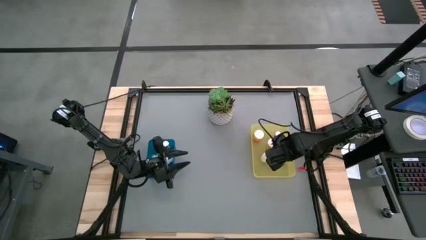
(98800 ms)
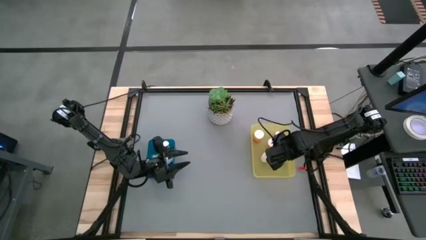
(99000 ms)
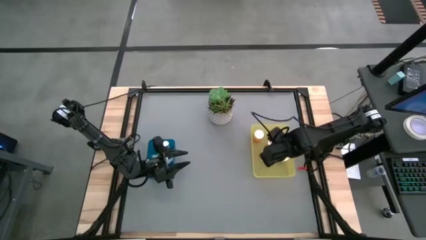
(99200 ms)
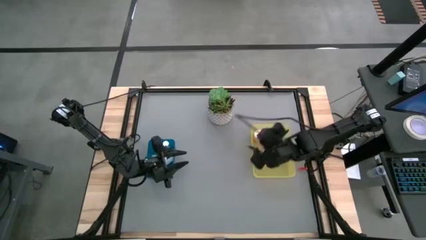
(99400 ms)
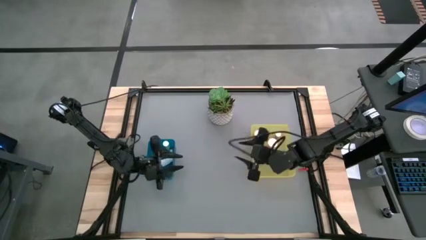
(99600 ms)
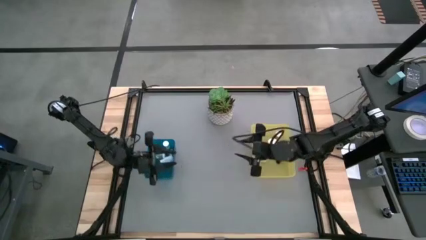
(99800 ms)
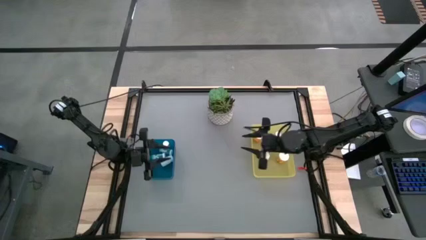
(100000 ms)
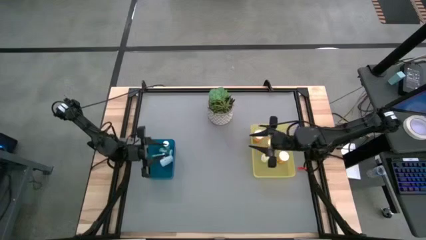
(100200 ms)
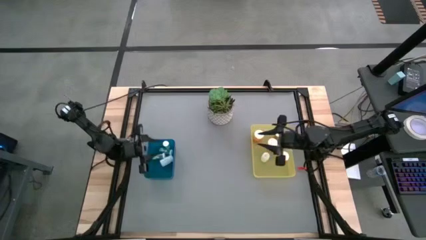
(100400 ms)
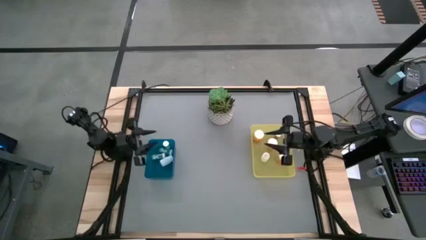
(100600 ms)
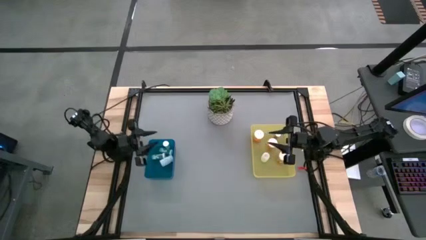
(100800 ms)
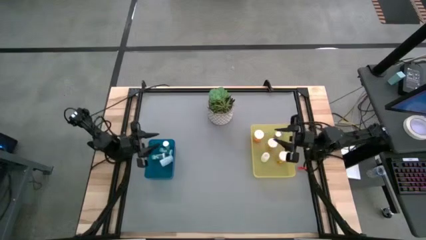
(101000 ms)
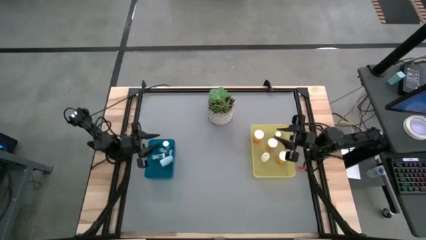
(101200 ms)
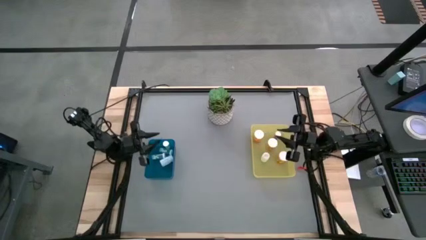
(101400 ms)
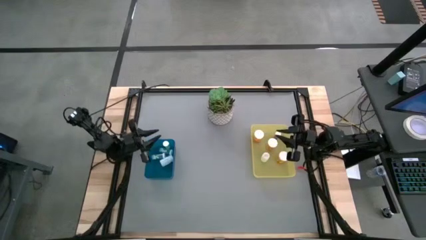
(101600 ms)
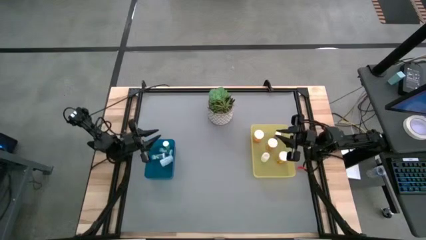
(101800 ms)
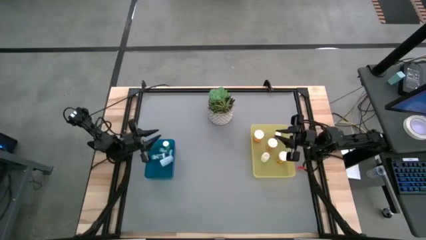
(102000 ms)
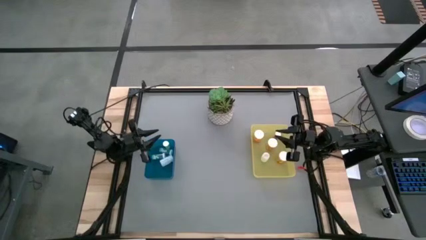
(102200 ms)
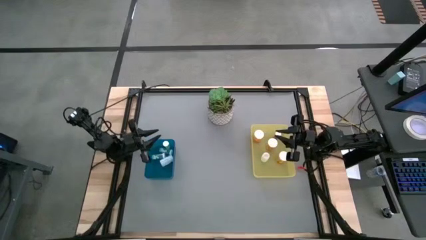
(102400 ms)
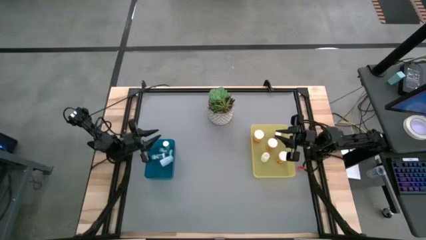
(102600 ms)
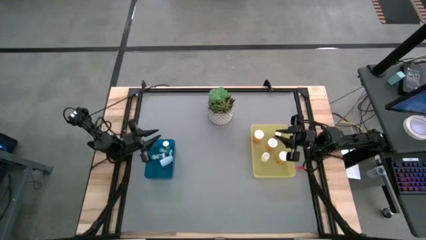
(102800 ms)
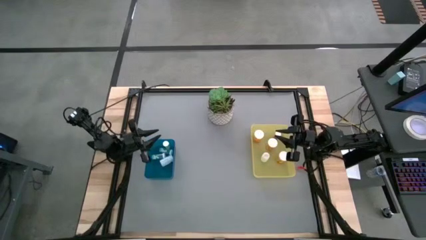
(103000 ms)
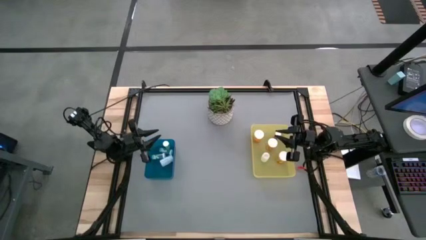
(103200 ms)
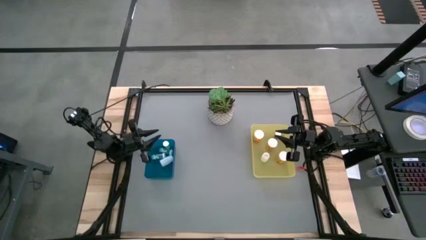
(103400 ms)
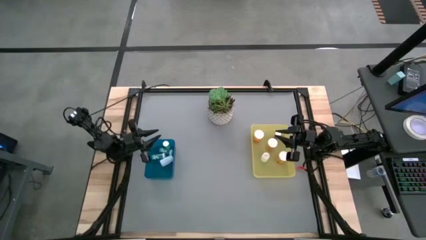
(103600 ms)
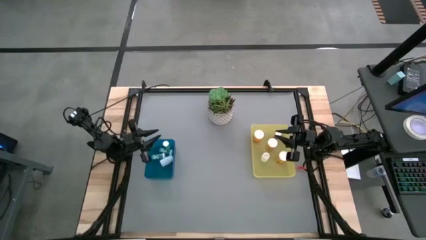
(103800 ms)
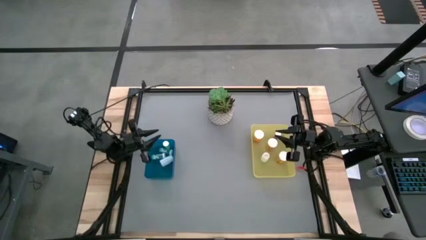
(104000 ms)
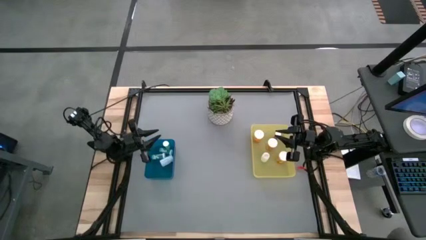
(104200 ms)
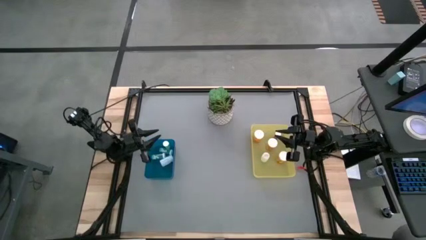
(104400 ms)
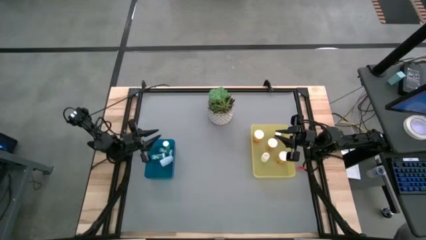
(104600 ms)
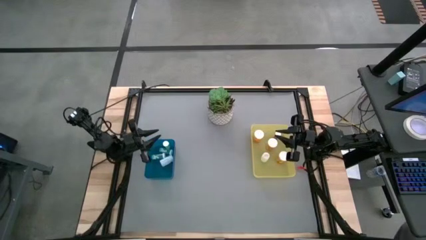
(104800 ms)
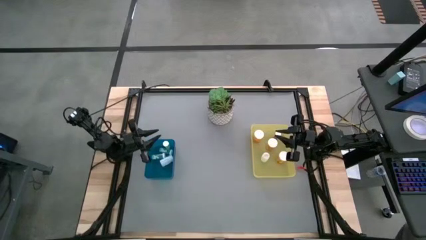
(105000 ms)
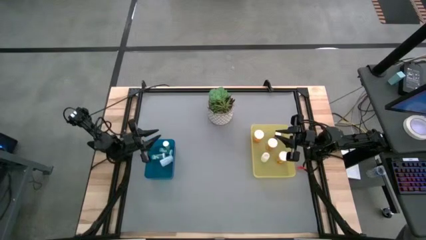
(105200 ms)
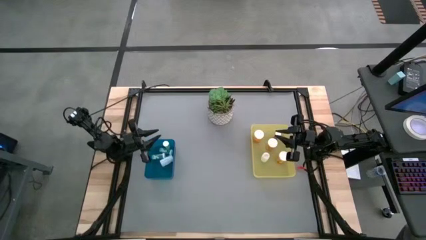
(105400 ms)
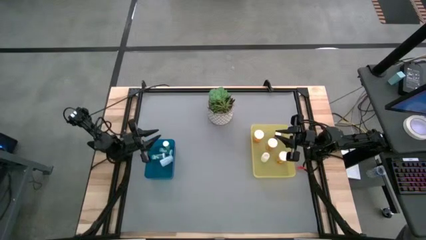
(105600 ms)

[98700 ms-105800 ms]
Task: Pick and place medicine bottles into bin by pill shape (circle, oval)
Return to Home Position

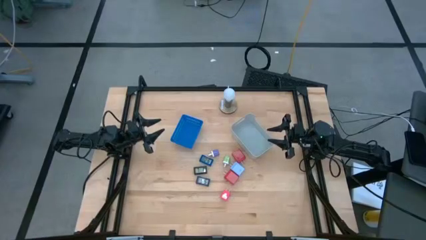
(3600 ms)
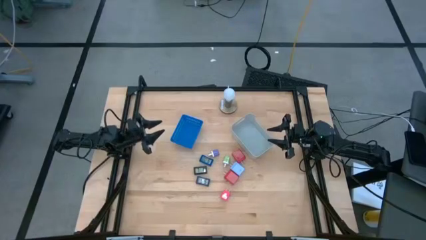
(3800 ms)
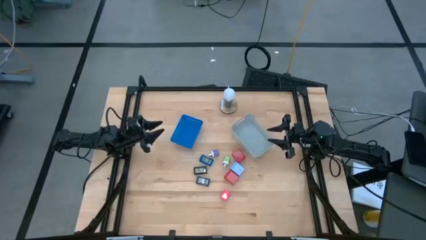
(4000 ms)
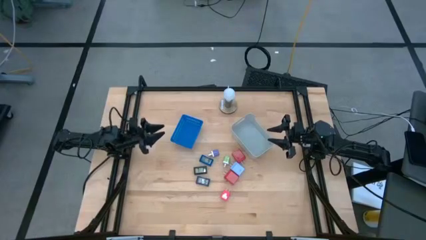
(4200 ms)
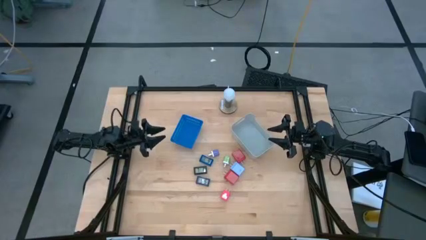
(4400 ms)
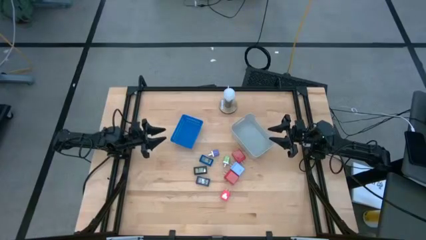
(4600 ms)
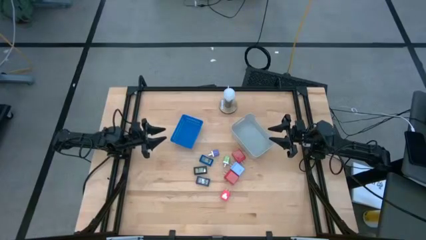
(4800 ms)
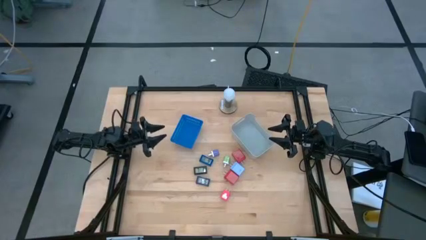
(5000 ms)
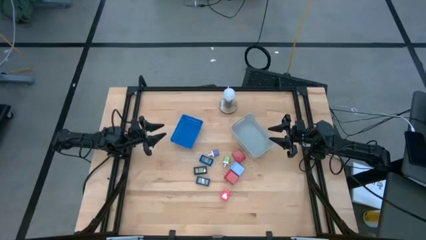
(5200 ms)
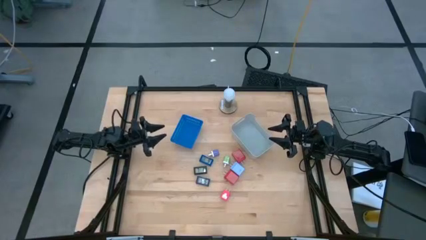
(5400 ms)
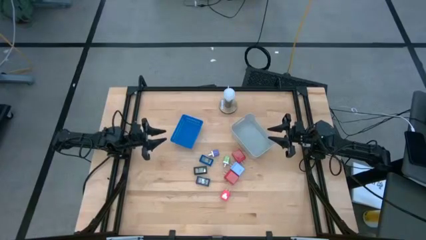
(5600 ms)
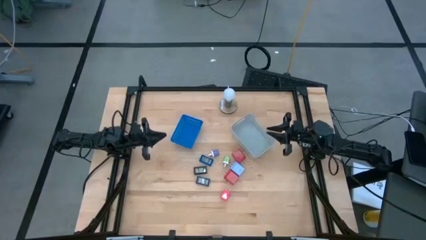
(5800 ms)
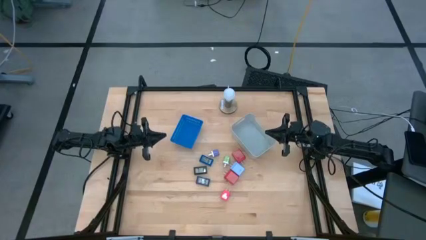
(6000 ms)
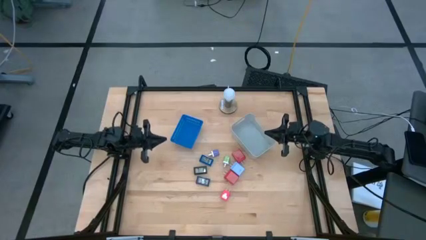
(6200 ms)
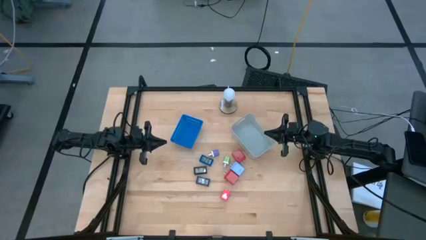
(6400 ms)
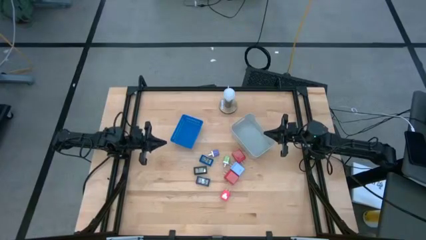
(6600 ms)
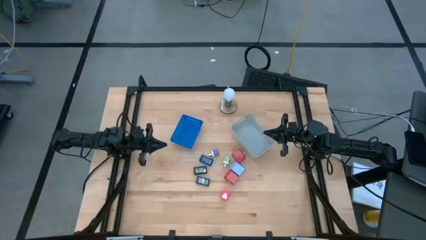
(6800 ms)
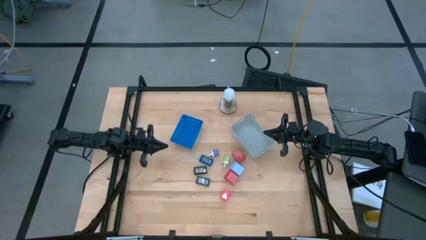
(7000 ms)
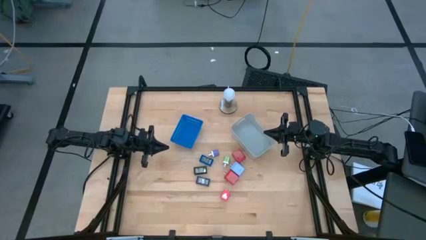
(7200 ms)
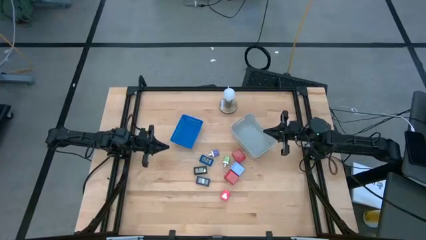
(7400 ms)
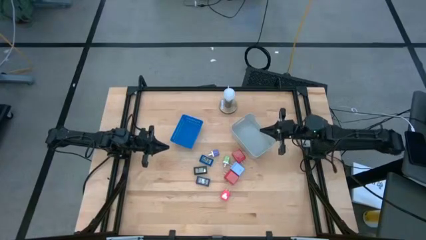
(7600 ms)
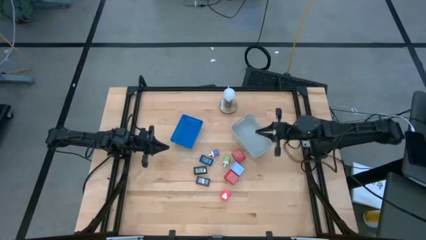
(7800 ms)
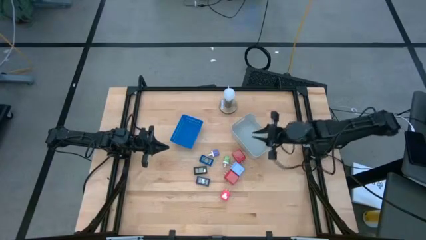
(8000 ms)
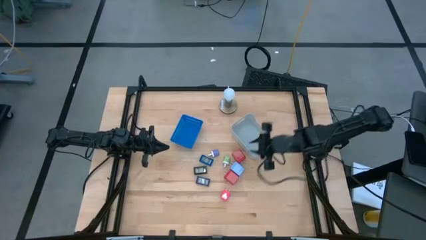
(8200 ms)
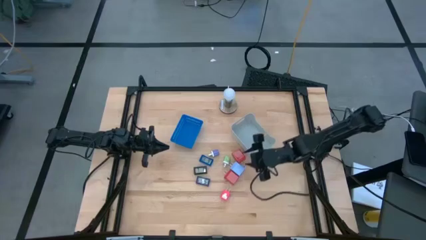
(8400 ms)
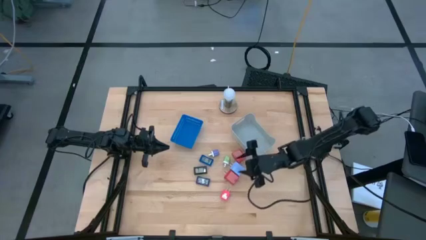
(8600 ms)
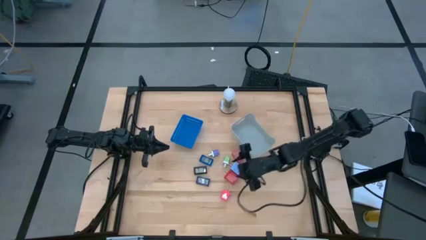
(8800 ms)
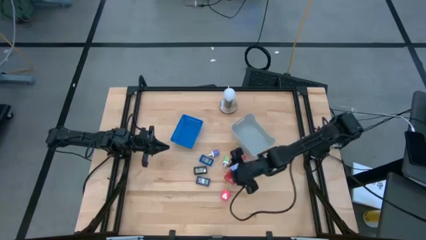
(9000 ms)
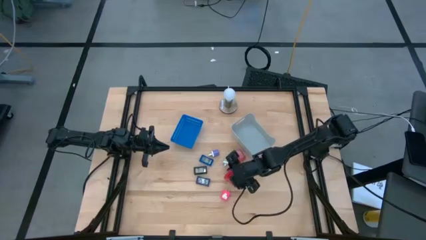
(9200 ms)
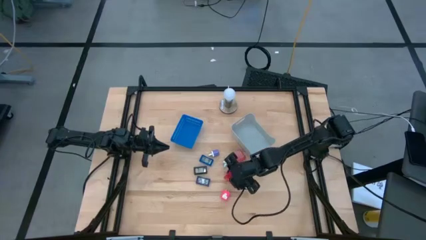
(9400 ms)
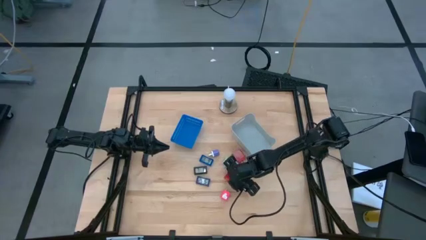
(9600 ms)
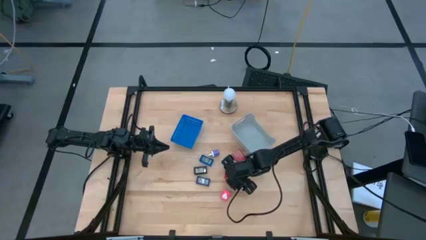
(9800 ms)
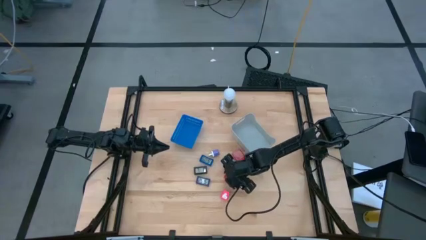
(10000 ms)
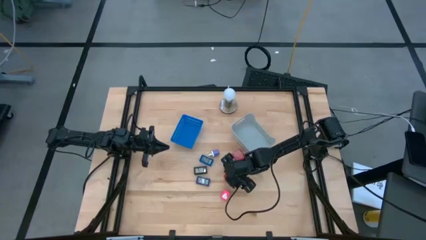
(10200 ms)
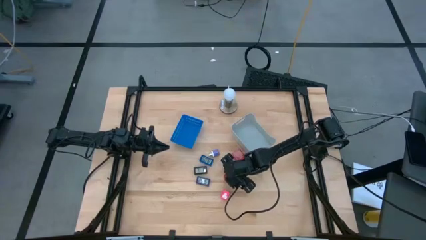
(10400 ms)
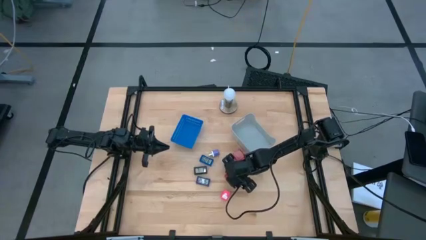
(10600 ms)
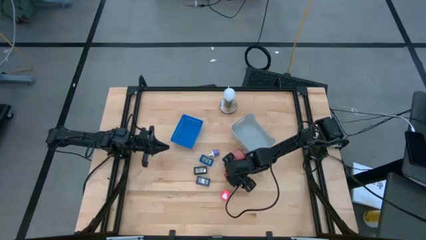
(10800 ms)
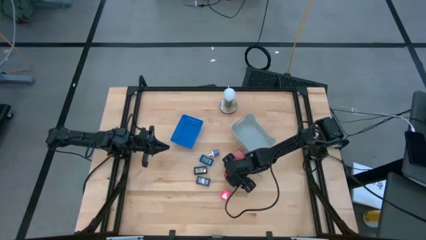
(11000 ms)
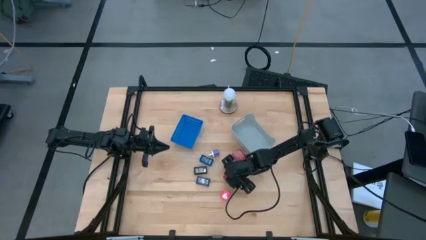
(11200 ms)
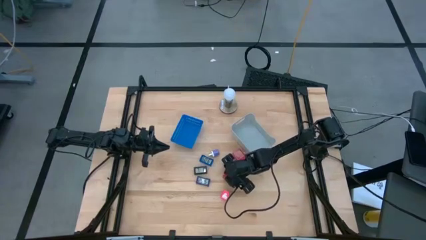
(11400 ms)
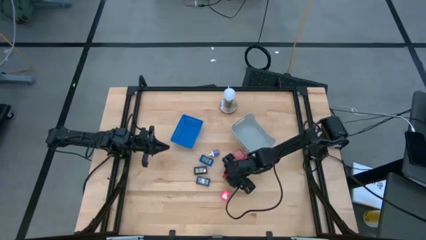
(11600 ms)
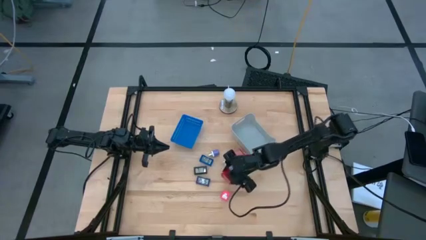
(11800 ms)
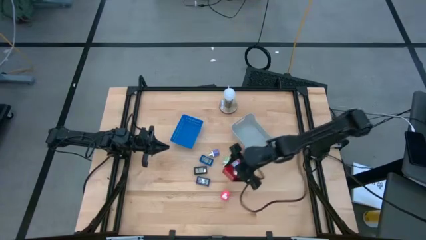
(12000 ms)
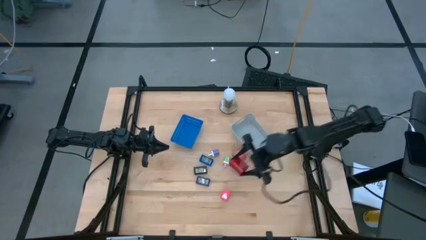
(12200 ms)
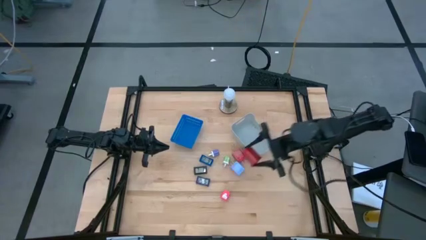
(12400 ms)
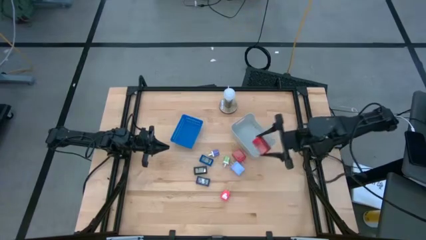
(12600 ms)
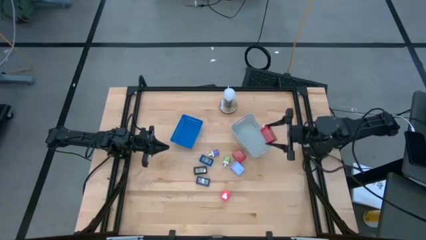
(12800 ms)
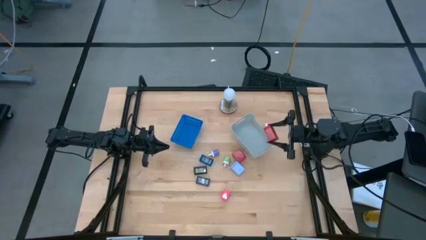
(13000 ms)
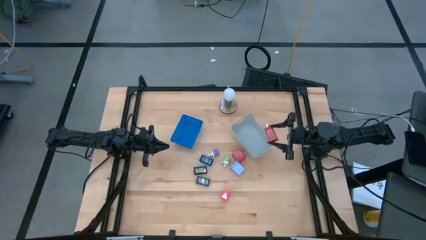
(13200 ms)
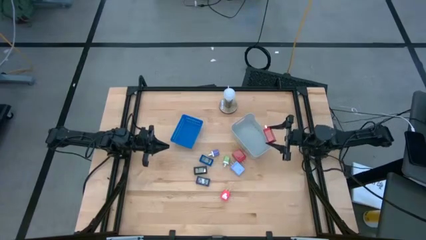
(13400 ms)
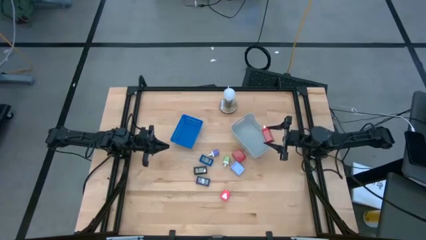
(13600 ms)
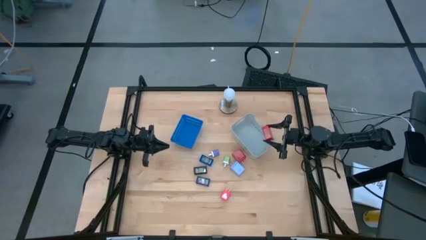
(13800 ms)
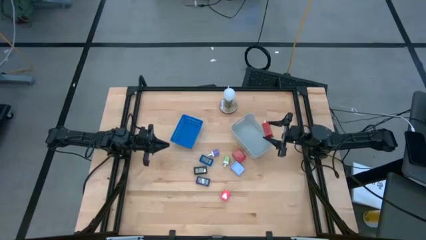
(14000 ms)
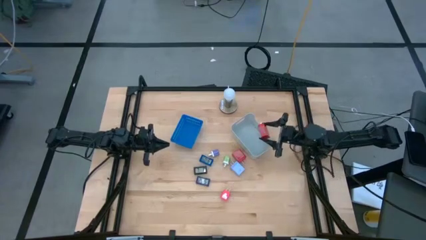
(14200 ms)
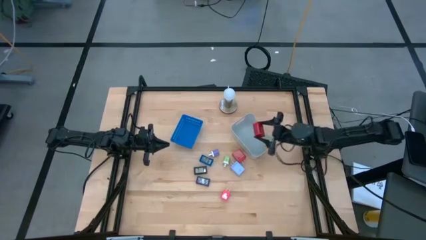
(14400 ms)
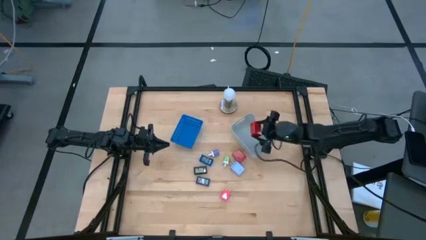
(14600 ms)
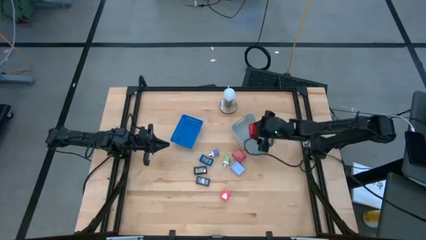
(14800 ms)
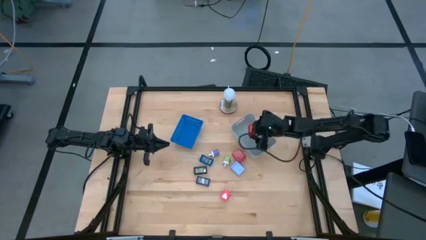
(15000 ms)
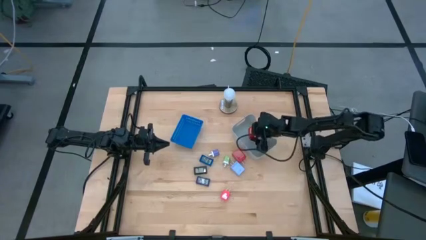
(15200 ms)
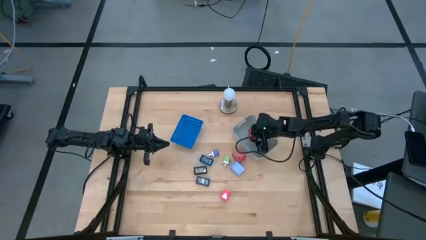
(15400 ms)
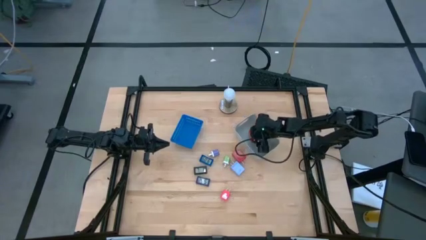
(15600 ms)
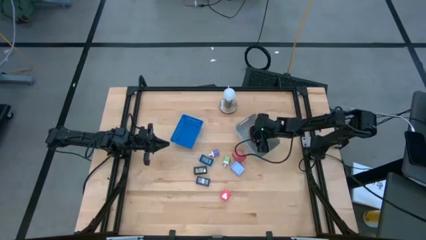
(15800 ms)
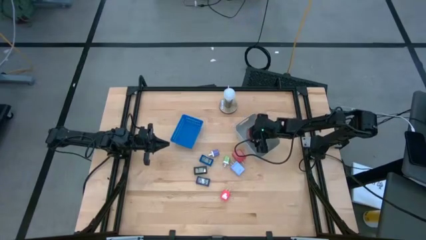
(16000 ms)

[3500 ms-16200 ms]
Task: Pick & Place Office items
Put the bottom red charger into the gray bin
